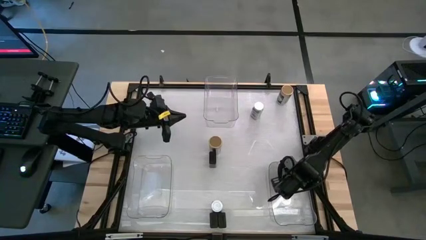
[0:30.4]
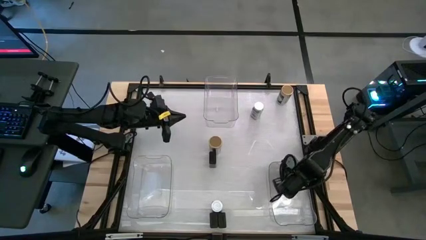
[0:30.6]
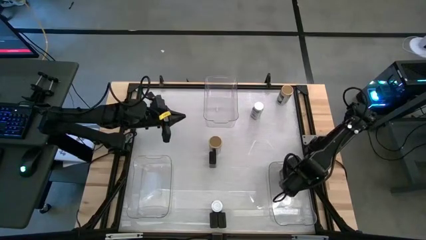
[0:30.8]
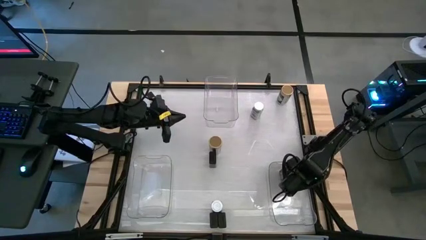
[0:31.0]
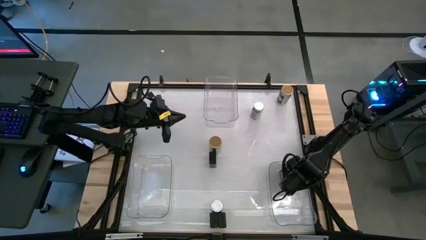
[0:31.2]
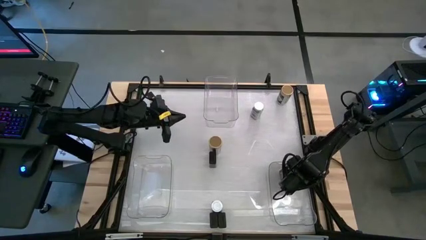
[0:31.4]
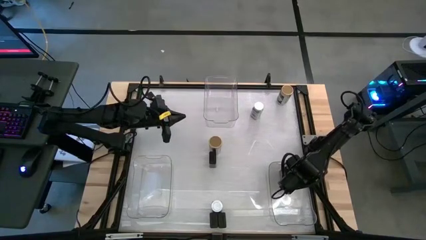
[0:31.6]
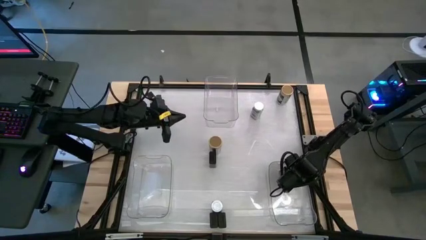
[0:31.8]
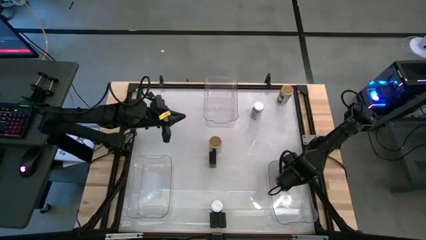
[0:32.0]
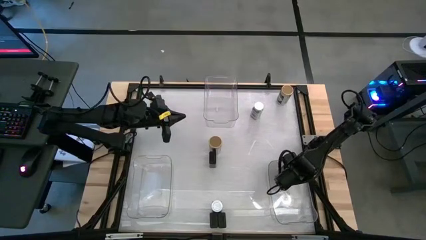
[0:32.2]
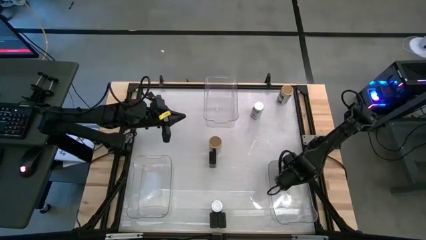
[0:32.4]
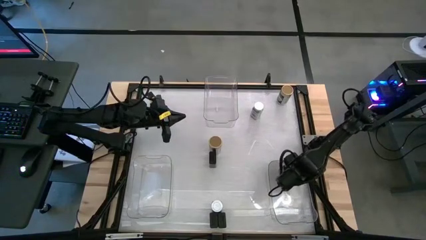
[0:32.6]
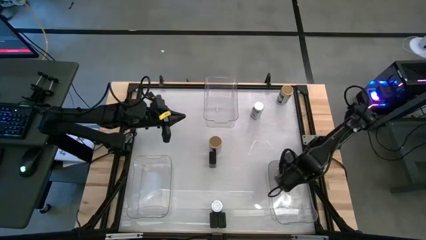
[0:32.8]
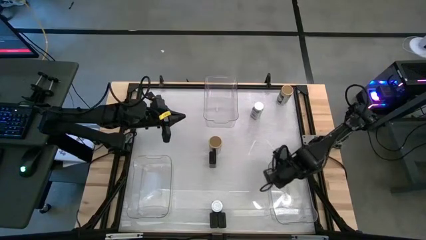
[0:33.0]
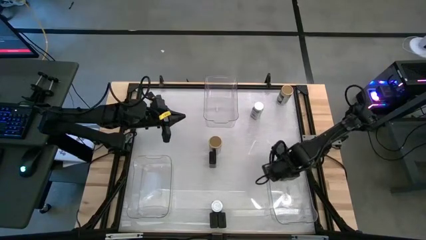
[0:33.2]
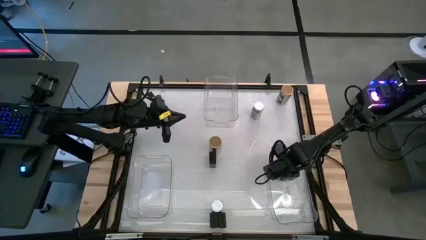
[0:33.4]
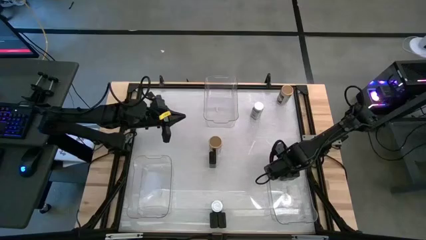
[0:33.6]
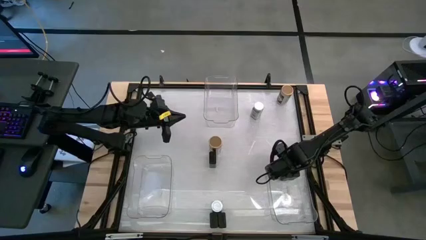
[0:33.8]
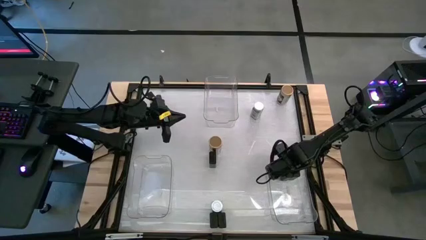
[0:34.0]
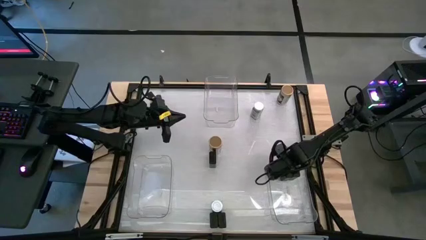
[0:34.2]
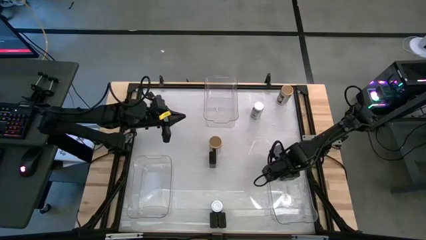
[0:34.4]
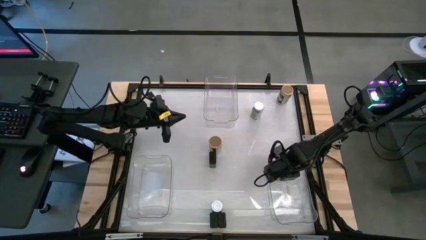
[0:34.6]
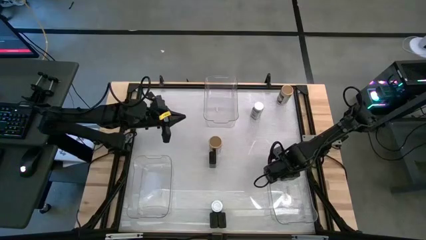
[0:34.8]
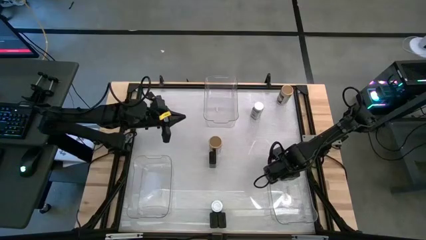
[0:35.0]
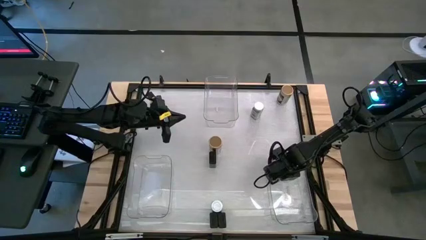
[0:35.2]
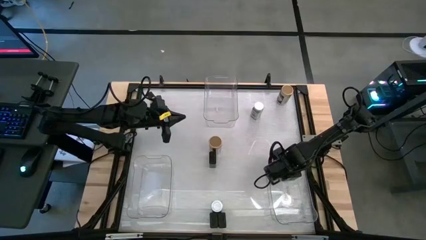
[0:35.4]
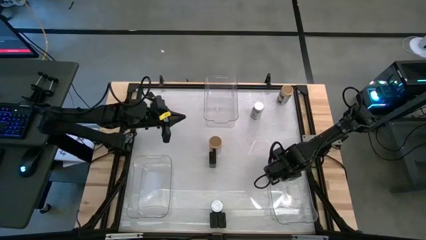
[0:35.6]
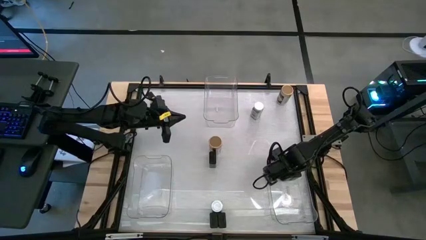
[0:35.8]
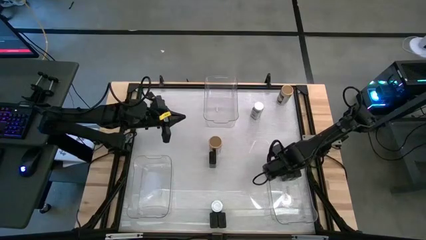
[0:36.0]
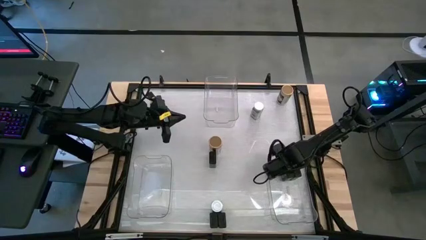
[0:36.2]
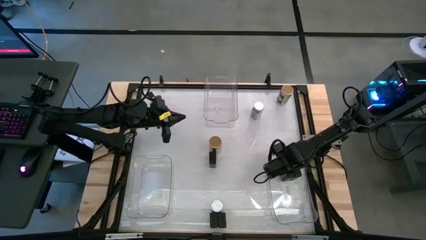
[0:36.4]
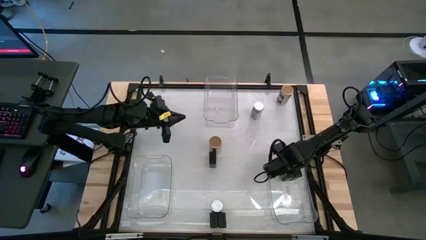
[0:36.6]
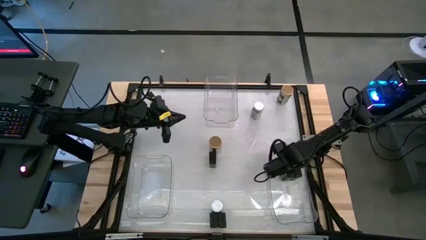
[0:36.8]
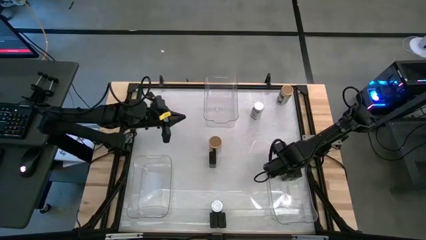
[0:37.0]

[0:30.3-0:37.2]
Task: Sort spices by type
Adjust the black spice cans in the right transparent bin

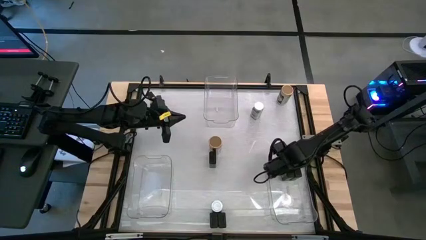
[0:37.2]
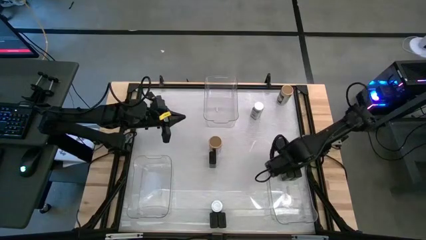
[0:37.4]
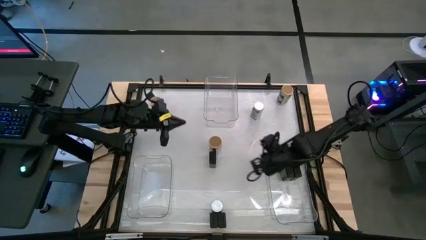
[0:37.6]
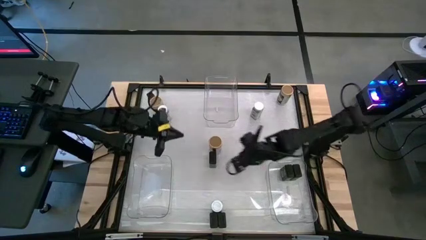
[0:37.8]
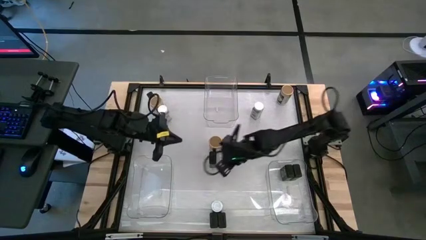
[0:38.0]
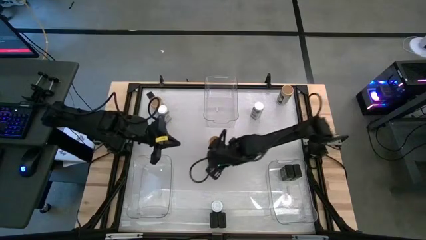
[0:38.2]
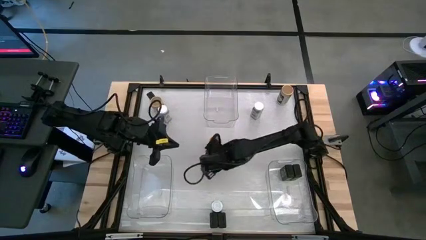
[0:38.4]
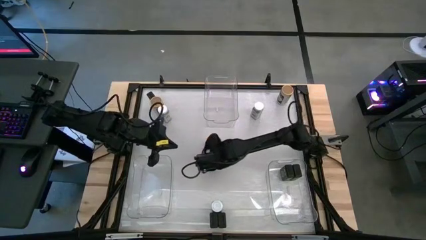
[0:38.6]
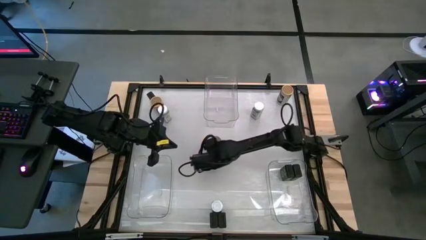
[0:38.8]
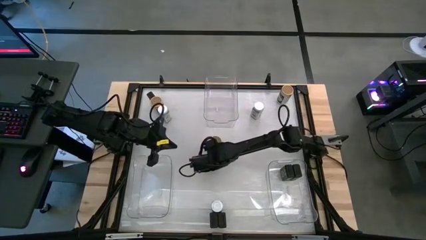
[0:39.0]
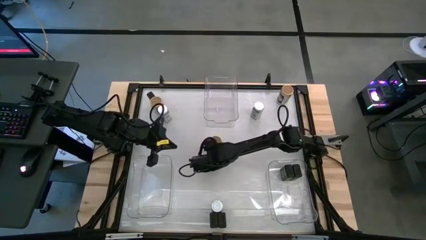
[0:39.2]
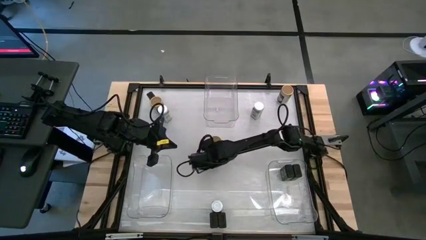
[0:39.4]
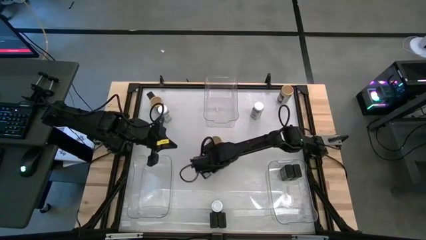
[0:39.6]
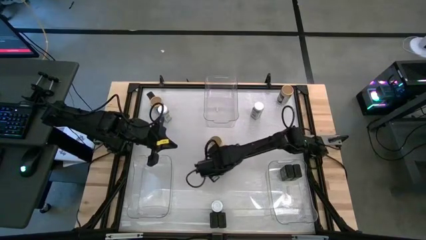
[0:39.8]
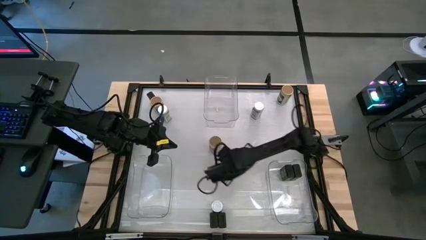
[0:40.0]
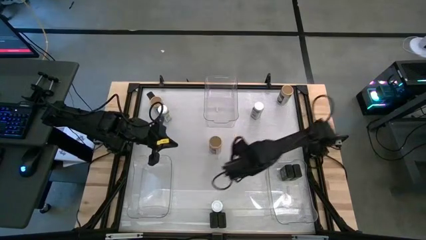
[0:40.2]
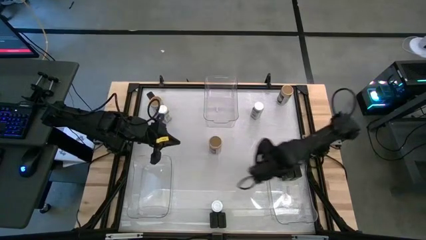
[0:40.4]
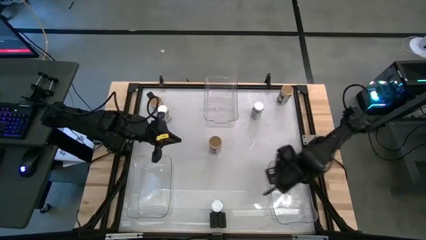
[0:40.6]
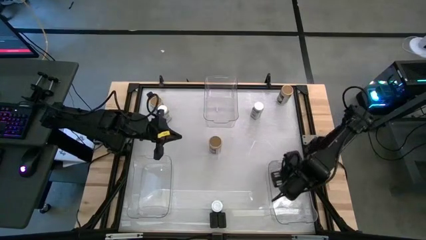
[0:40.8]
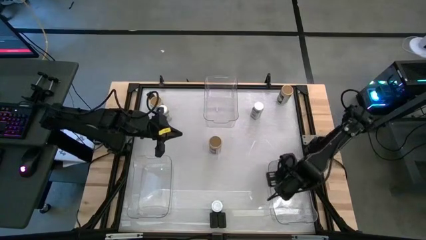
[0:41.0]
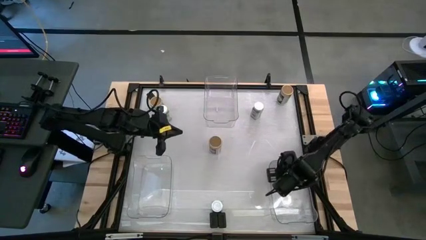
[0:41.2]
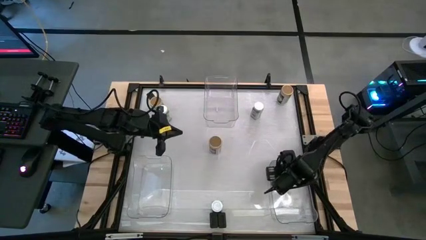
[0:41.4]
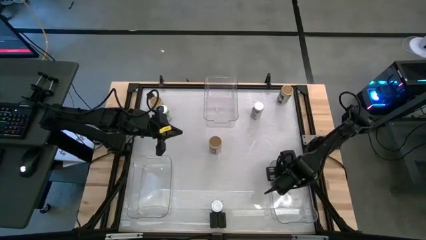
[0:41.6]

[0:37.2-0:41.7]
Put the black spice can into the right transparent bin

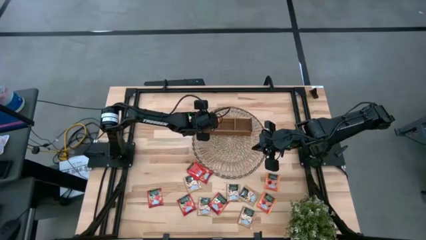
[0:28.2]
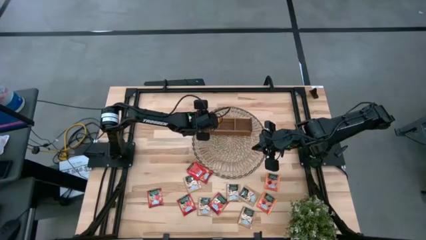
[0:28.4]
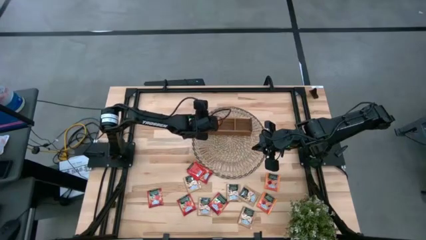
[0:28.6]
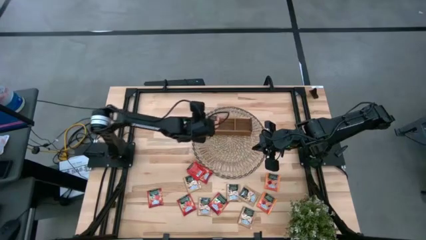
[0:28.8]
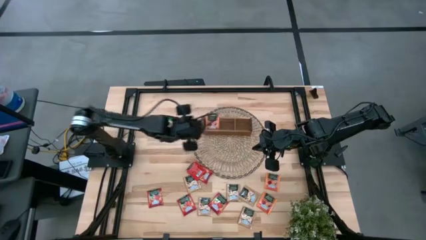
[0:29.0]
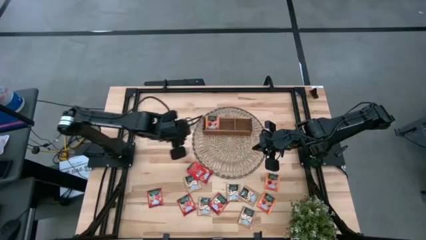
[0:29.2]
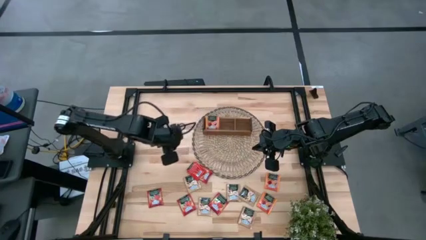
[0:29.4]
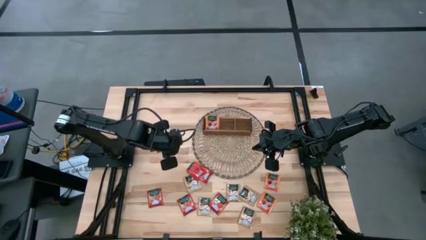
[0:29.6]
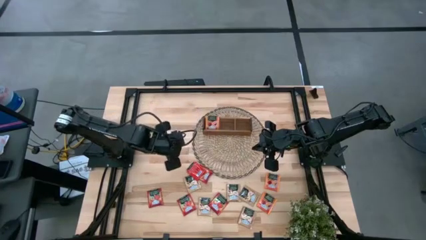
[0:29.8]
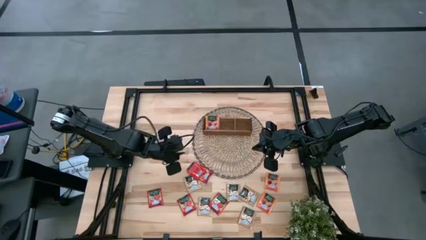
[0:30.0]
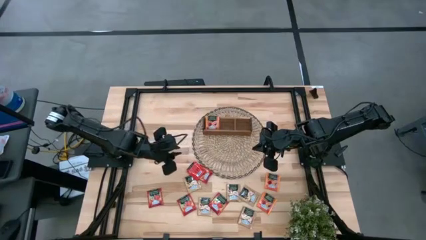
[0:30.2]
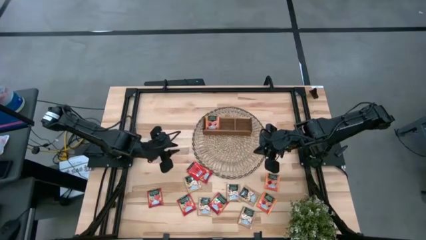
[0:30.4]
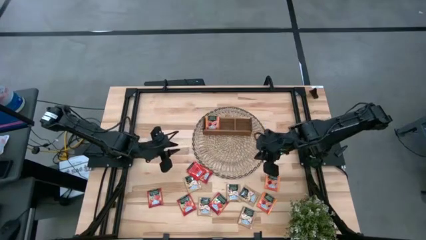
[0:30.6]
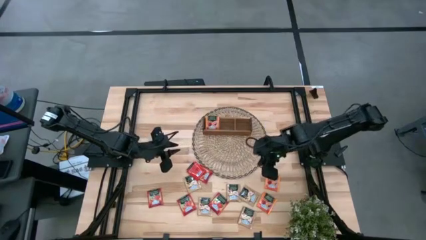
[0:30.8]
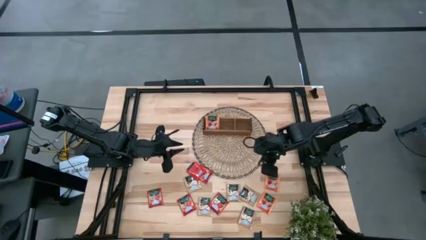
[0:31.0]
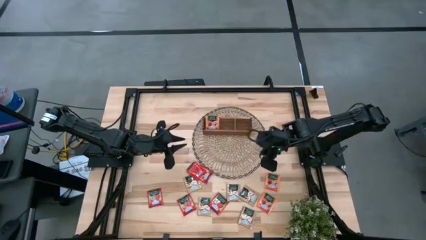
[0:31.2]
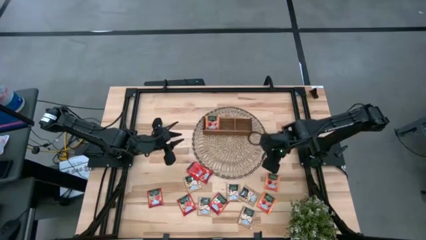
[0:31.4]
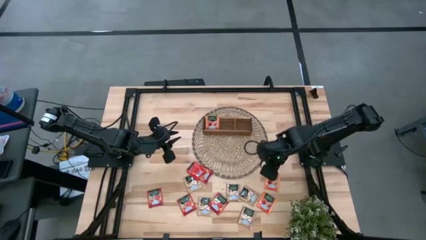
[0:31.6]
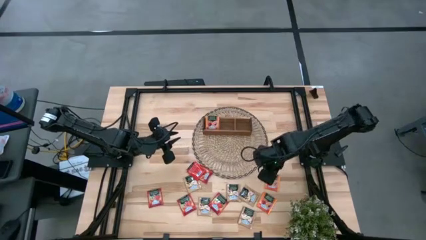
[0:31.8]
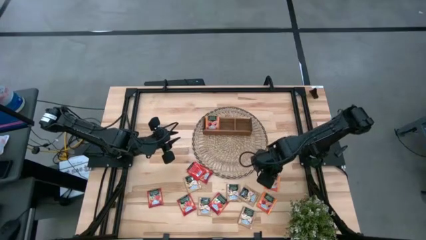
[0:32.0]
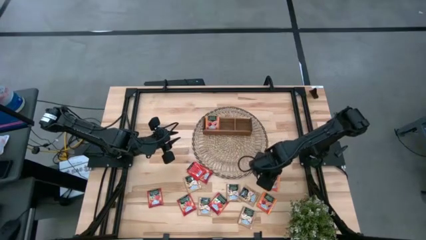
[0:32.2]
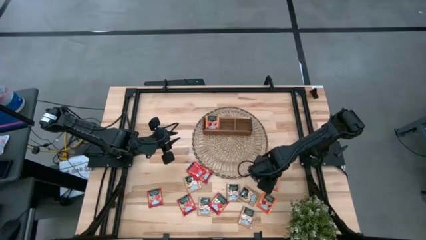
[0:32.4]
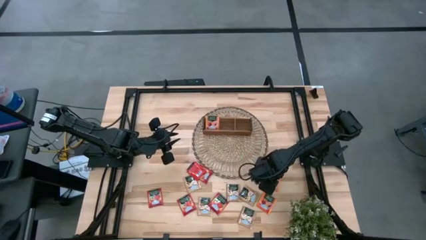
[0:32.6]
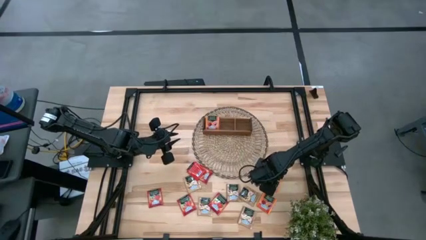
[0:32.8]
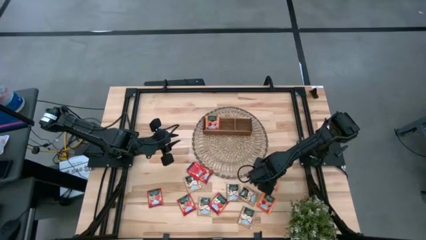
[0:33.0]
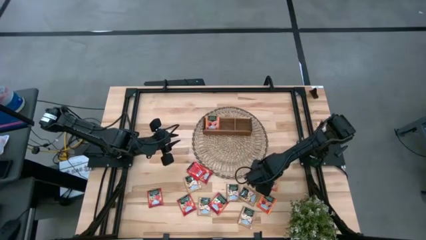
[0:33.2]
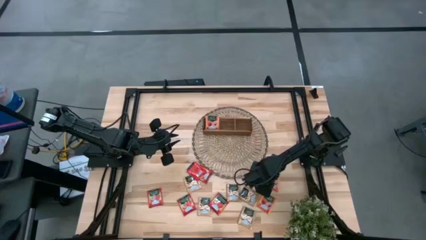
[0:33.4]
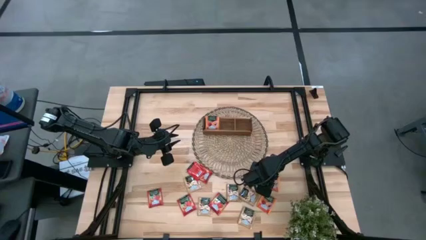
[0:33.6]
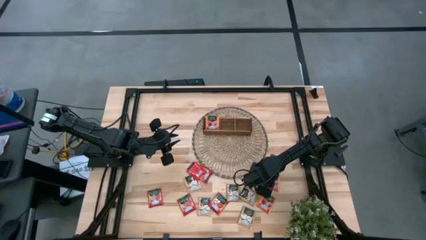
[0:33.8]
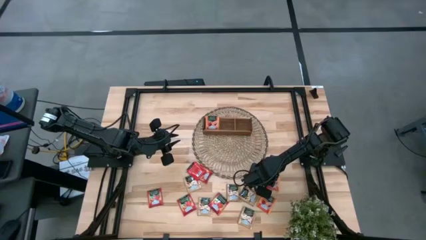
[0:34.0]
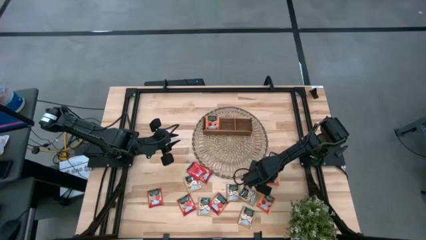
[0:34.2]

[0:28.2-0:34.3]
Task: Pick & Place Tea
Put the orange tea bag into the left section of the wooden organizer

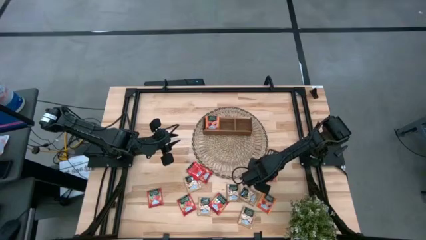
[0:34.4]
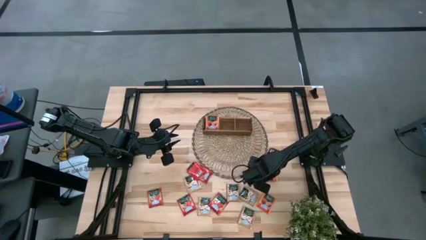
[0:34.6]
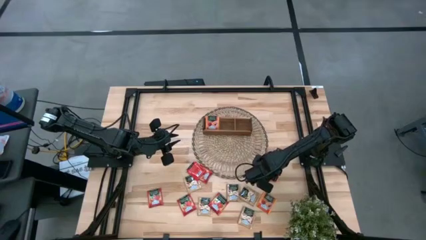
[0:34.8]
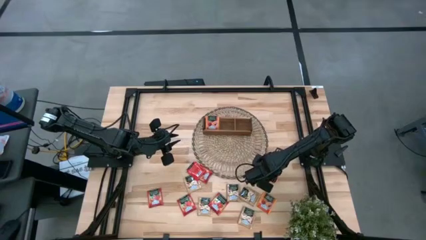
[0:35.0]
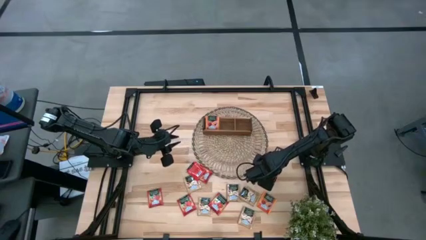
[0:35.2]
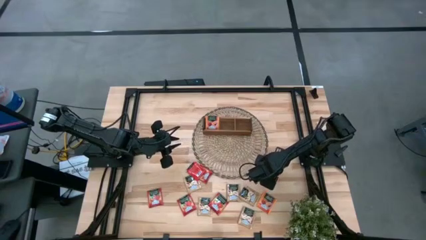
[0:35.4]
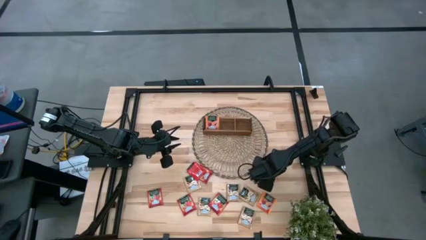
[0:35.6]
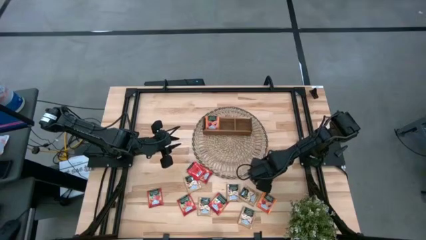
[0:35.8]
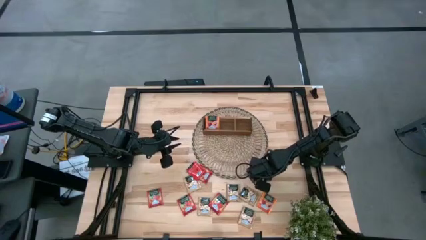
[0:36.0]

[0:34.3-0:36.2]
Put the orange tea bag into the left section of the wooden organizer
